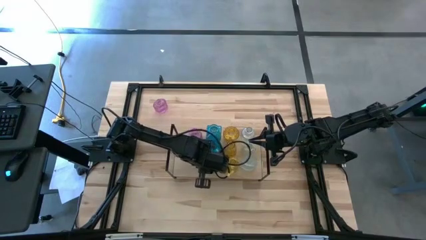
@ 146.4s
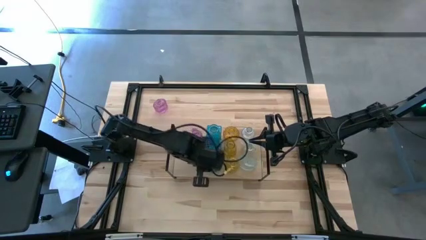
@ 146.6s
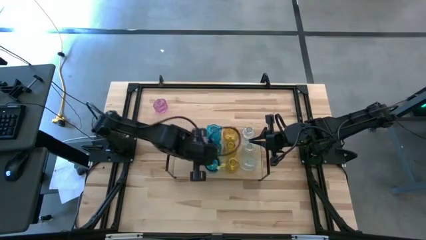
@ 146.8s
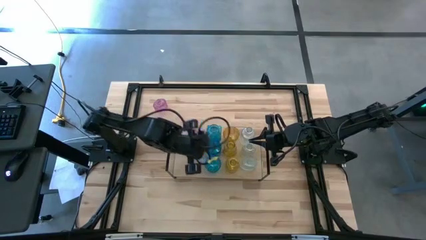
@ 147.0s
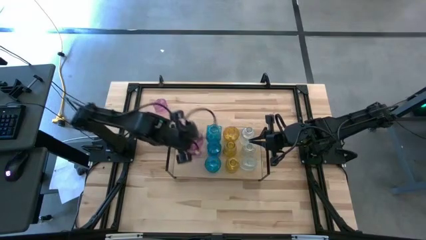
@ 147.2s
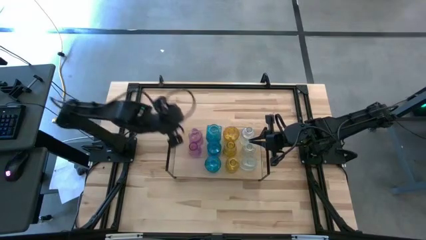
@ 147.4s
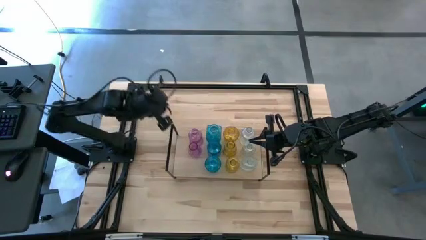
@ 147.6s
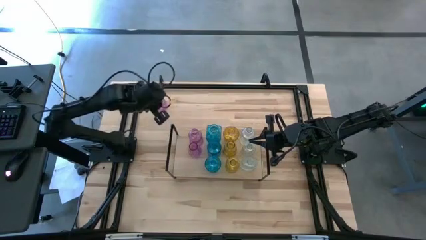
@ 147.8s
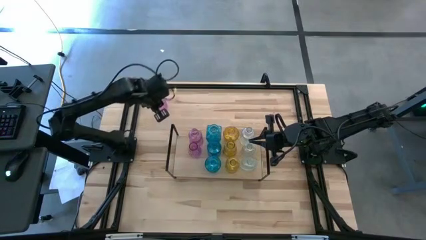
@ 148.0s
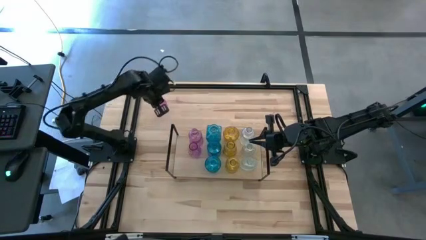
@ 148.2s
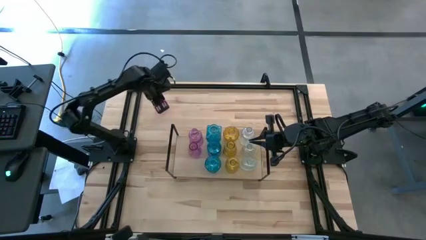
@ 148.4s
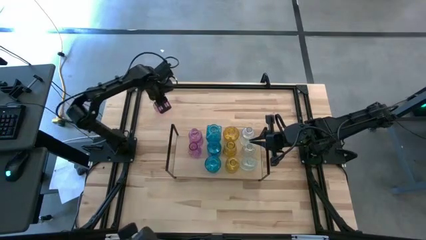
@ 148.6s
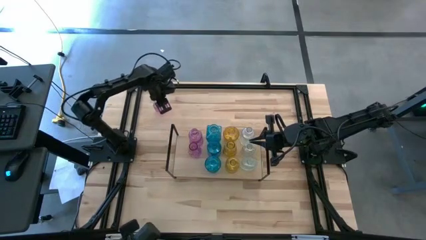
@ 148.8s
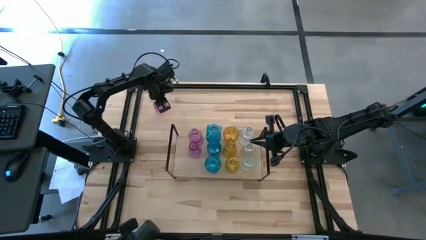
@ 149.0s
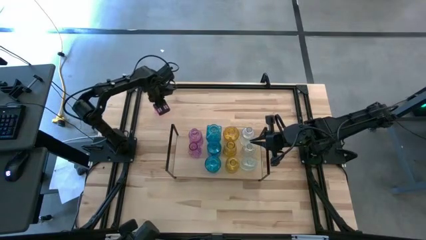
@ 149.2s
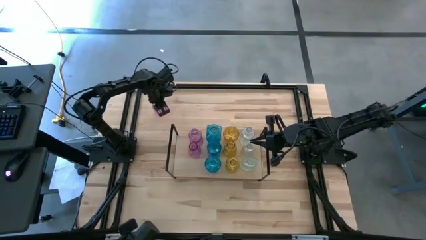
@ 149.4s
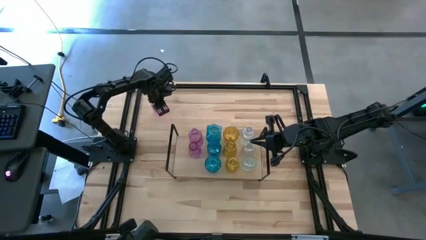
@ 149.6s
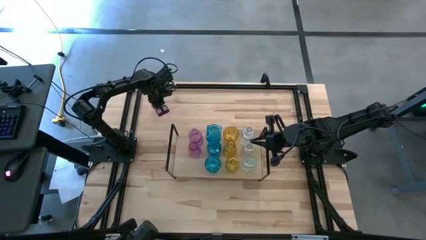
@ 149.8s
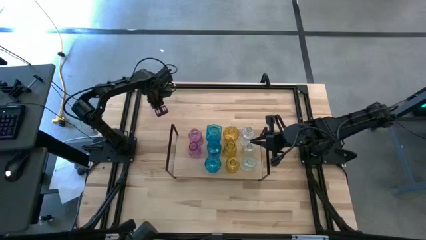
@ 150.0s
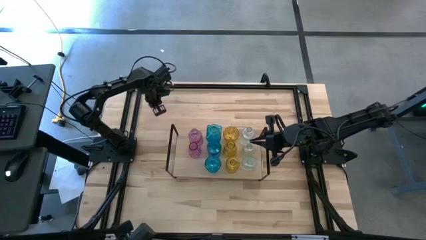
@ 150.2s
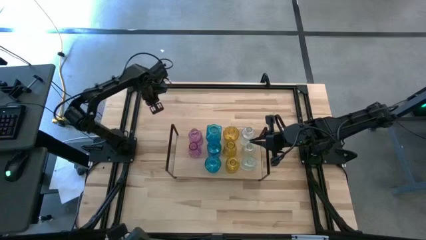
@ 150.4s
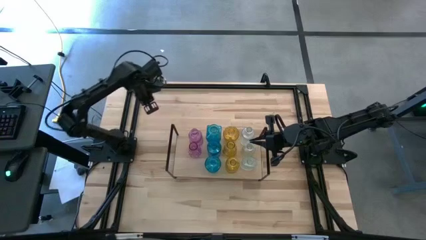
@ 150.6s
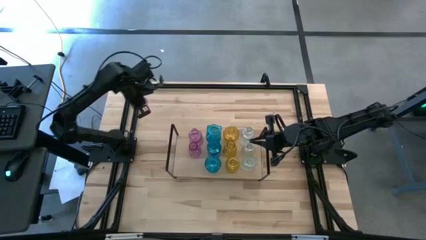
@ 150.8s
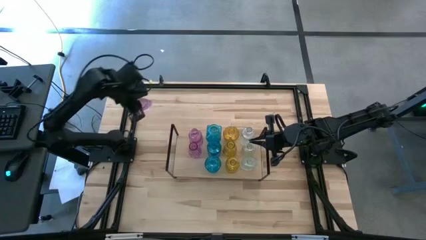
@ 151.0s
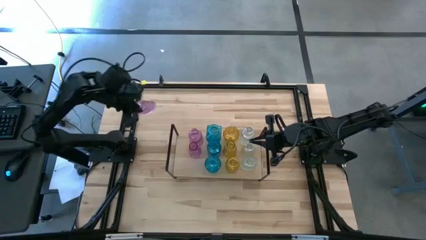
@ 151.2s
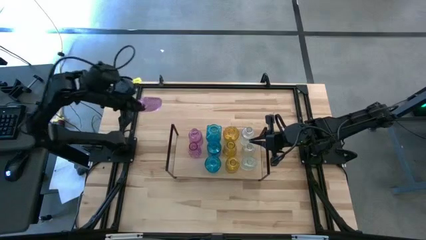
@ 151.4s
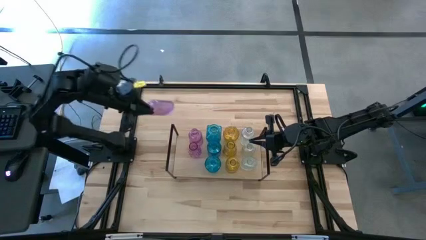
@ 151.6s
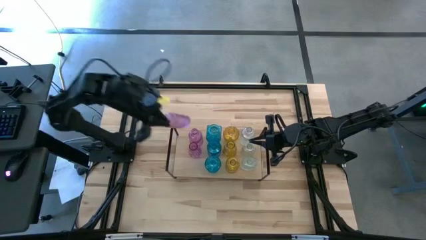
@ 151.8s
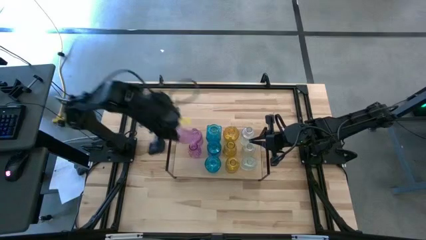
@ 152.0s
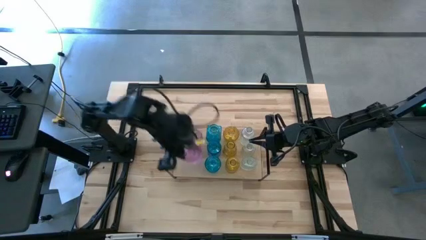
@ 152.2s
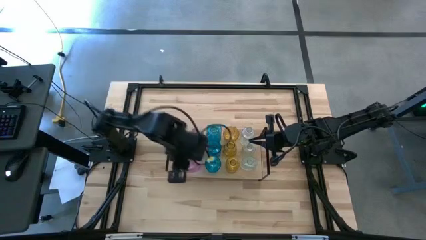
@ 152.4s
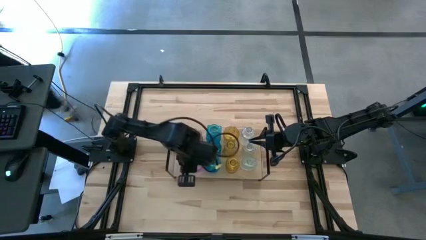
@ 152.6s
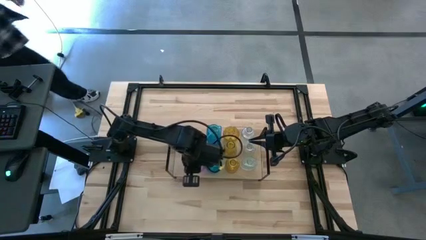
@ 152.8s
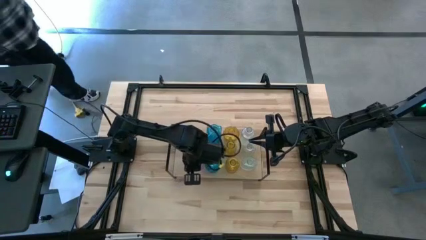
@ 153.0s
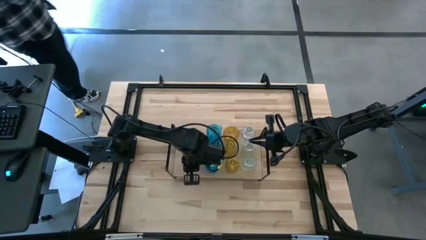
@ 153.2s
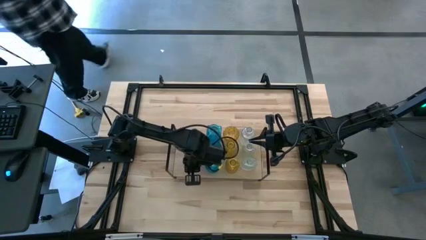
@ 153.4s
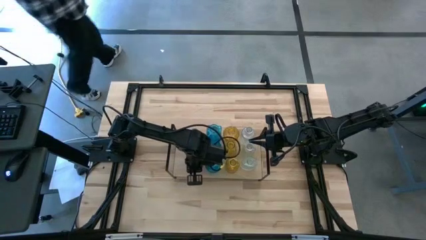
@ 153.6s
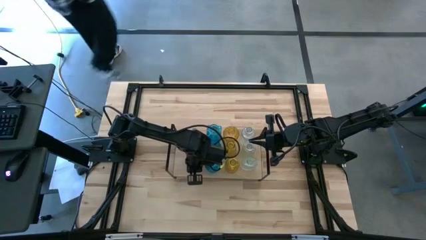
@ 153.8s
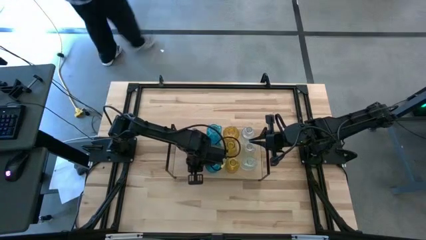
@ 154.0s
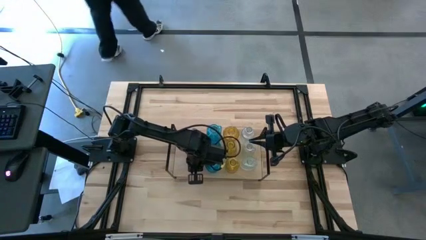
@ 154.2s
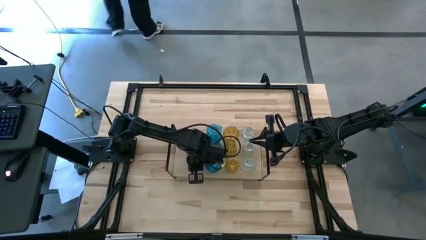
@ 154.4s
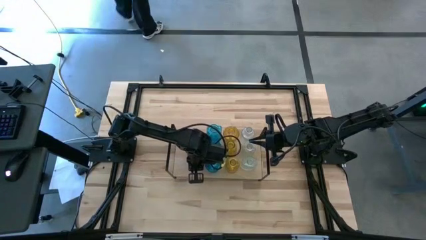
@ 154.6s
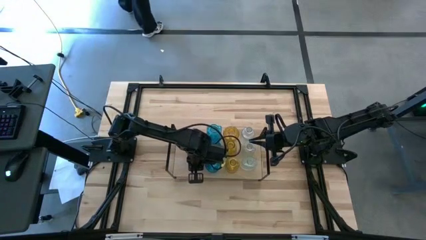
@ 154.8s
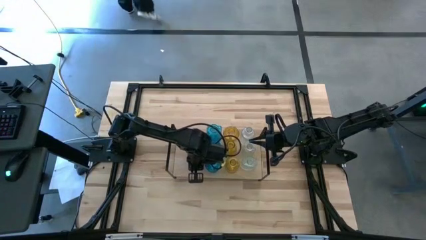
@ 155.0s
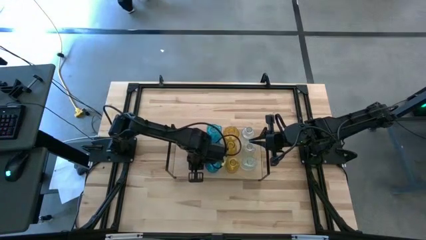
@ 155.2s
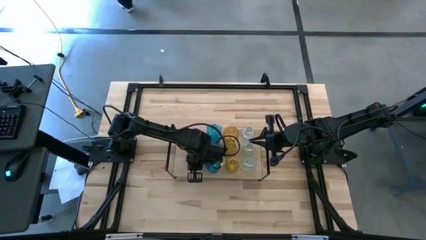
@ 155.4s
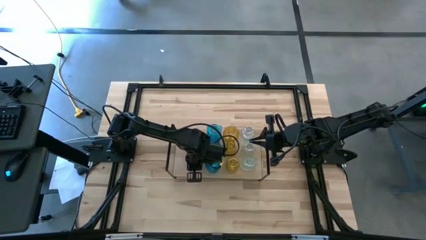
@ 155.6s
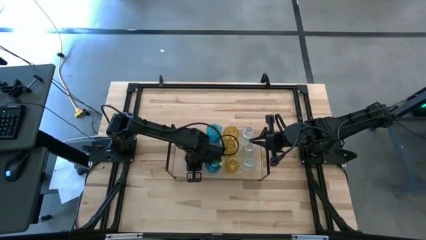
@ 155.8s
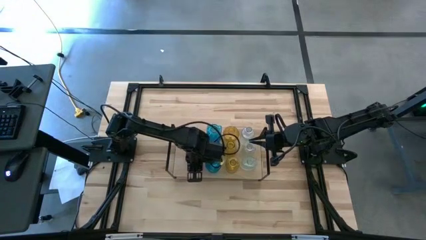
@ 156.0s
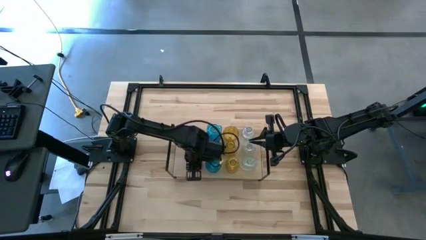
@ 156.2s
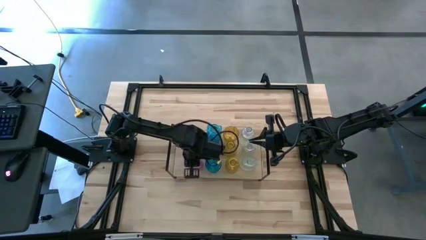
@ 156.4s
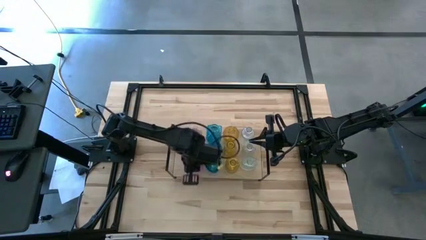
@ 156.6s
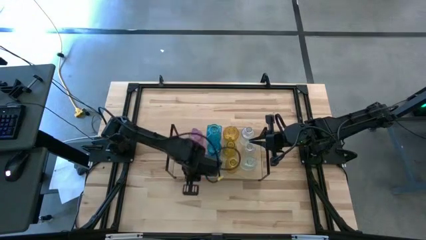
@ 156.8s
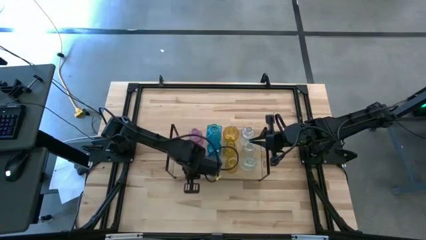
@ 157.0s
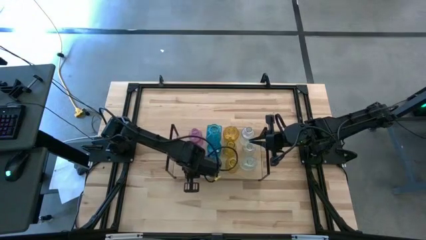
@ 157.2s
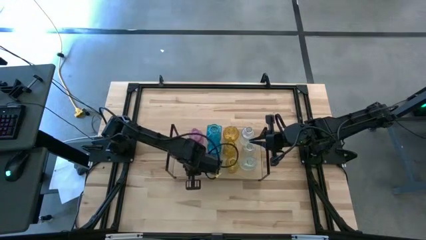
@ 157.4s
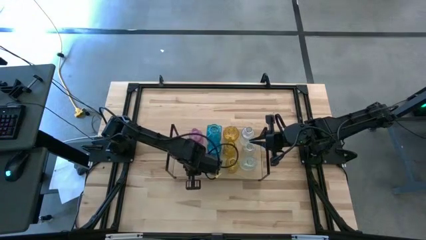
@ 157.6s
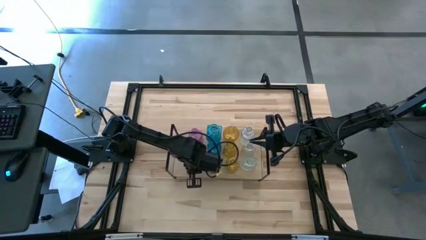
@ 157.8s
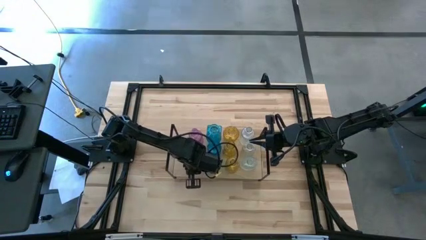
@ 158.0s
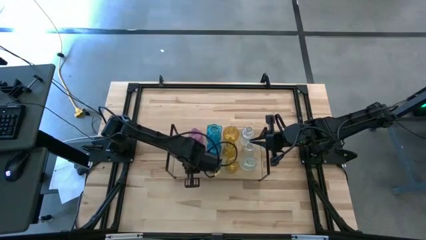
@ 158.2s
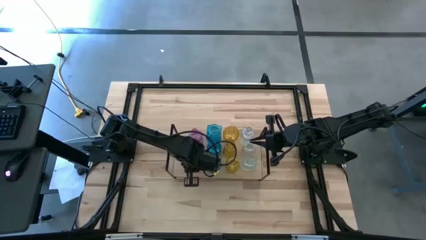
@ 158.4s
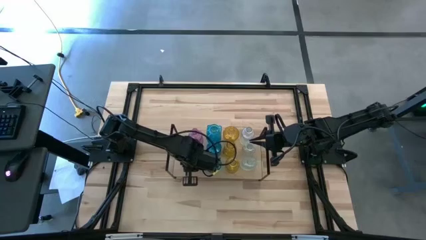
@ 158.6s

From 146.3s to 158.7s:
Task: sort vases onto shelf
Put the purple vase on the shelf aligned with the other purple vases
